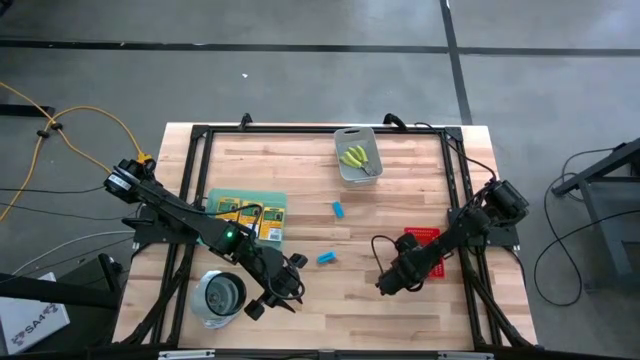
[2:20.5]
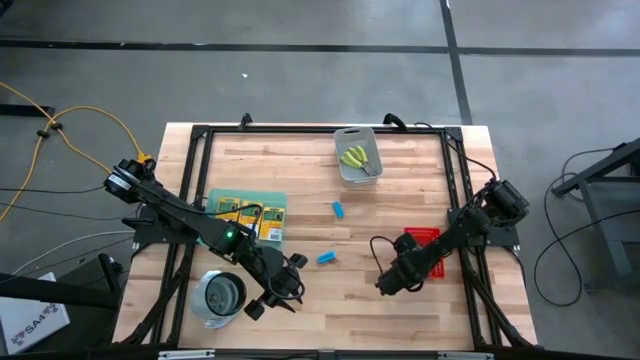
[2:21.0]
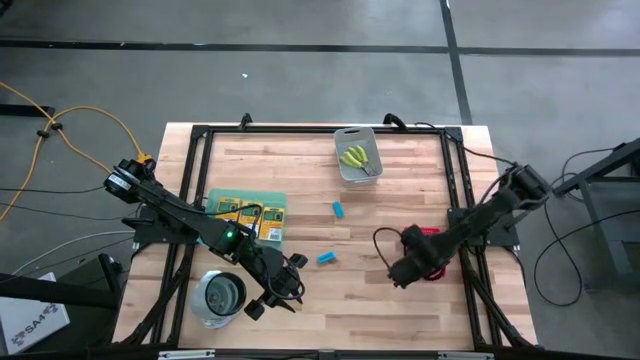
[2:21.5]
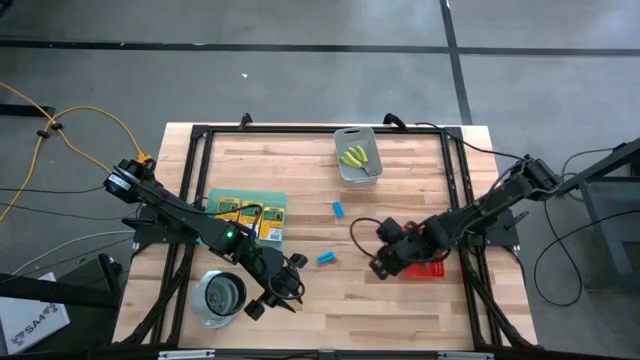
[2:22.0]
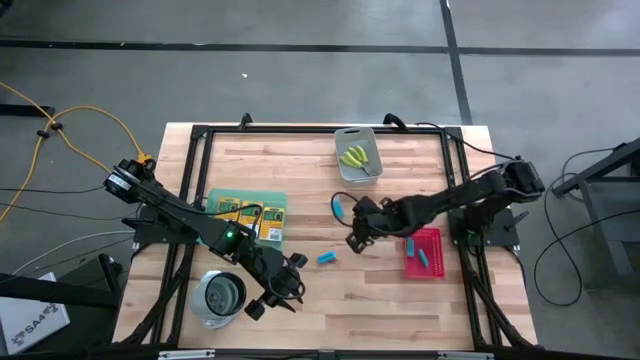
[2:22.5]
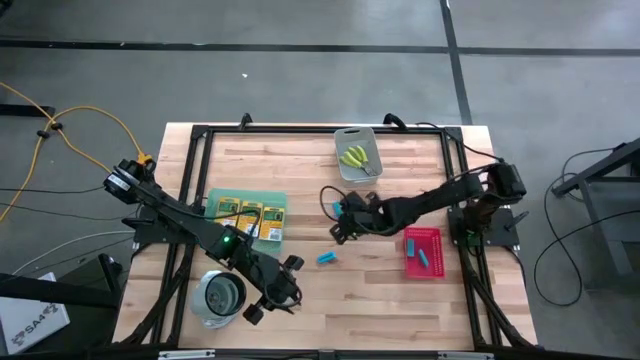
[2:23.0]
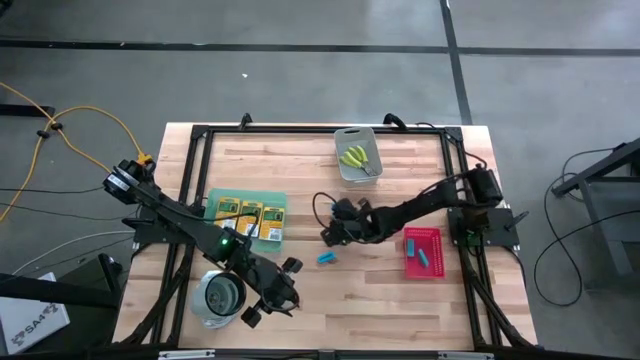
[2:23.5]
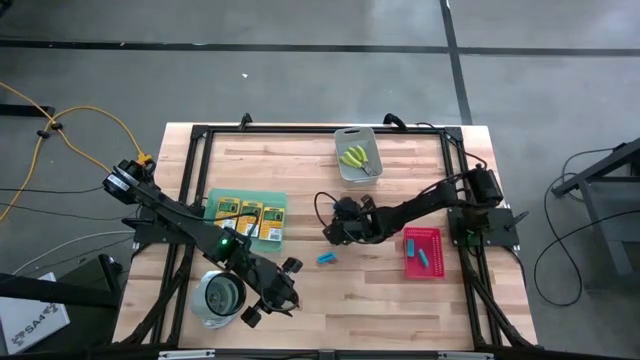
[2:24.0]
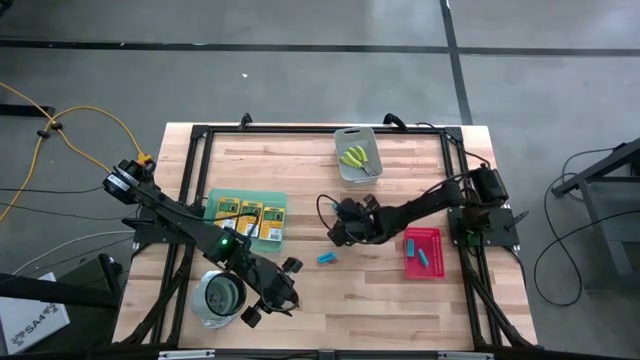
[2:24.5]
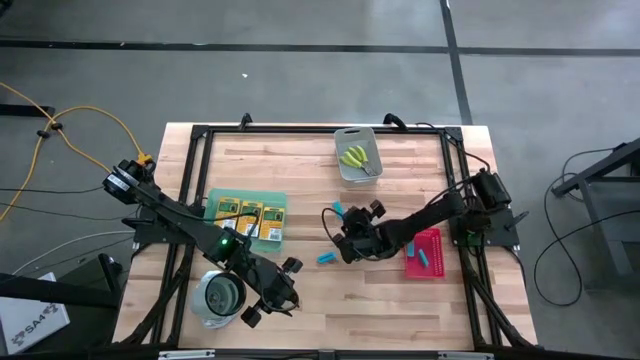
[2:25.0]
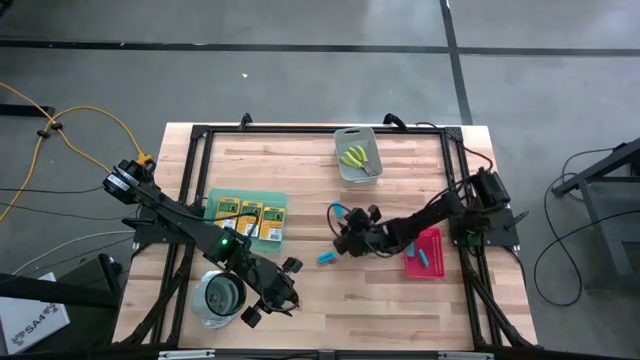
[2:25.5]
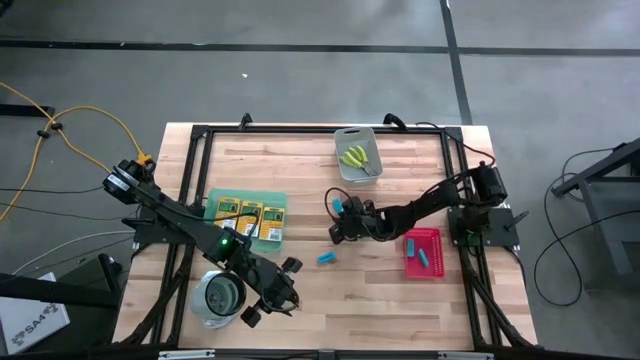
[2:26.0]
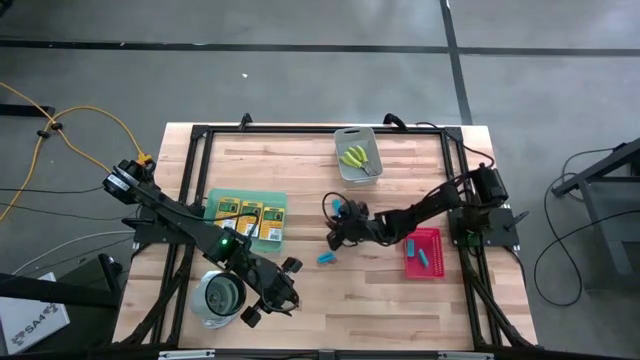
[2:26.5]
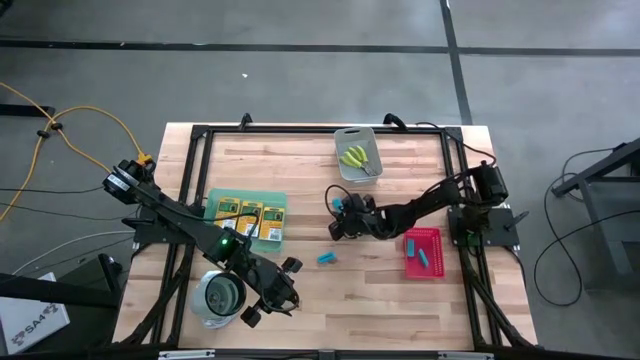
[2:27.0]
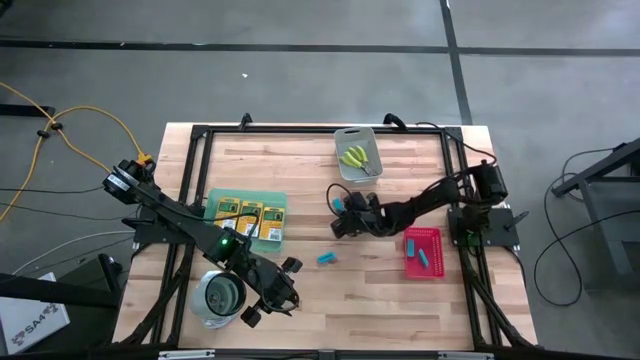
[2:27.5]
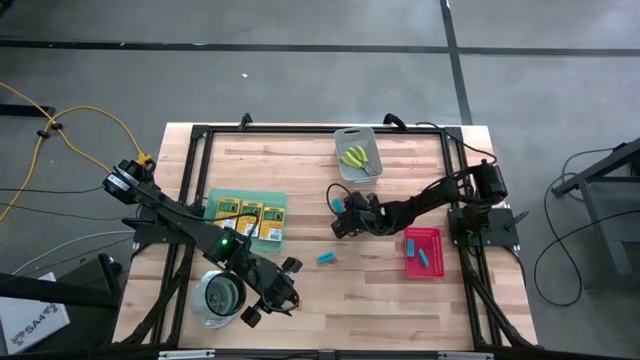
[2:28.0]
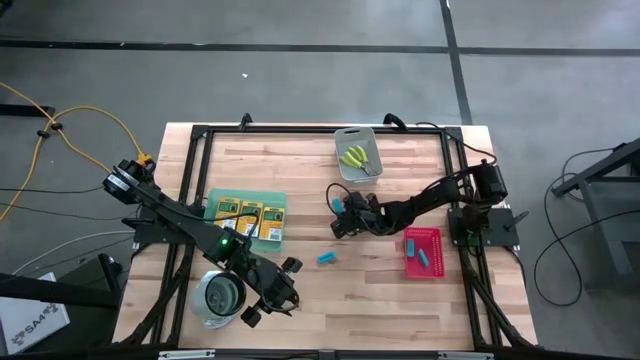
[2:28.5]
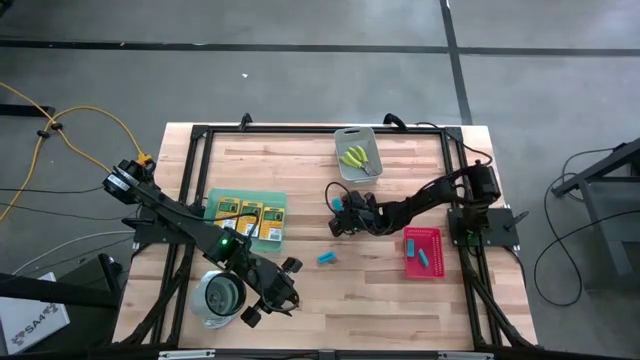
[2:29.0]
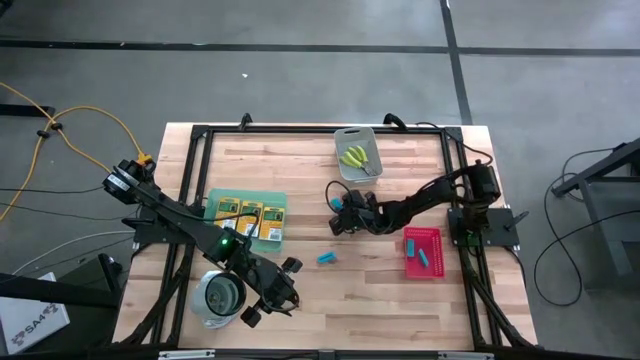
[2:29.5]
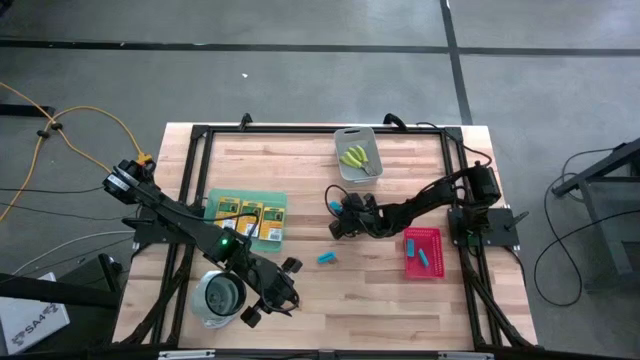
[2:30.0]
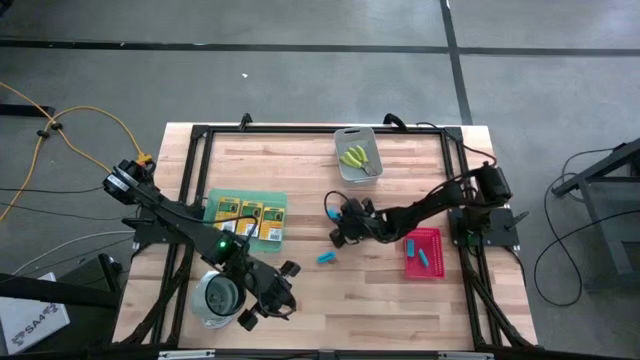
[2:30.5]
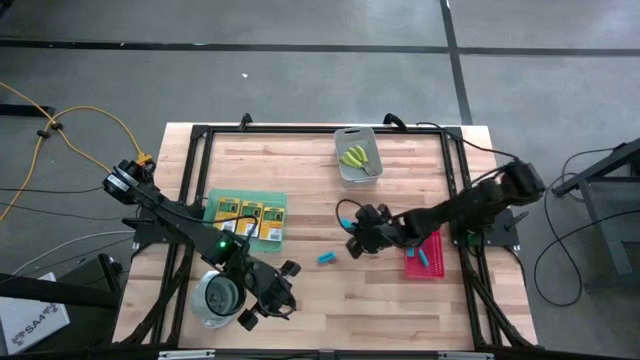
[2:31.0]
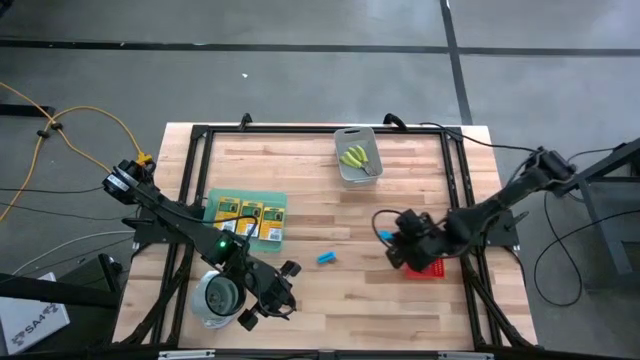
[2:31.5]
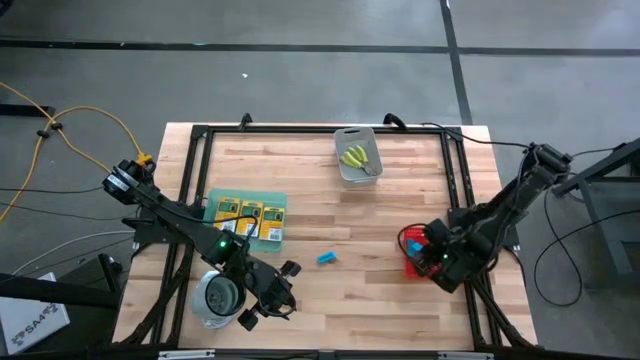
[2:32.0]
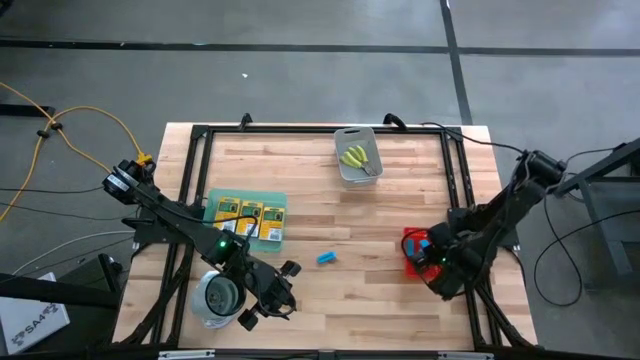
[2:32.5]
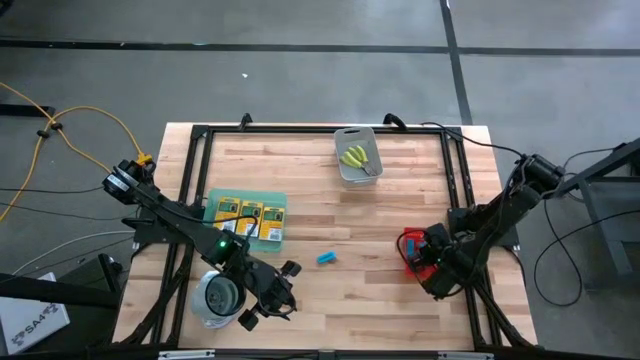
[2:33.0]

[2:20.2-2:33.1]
Task: Pick & Place School Supplies
Put the blue eraser into the red bin

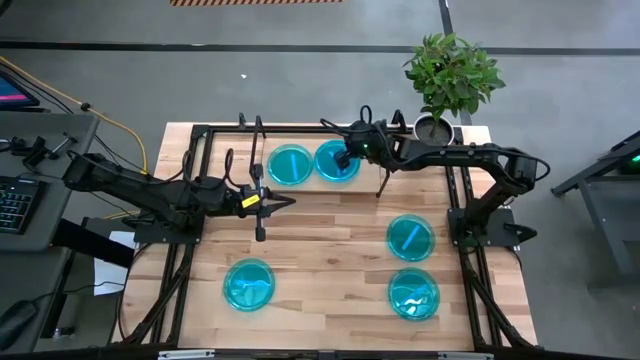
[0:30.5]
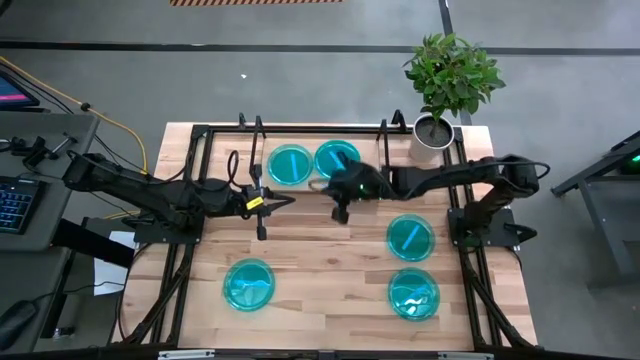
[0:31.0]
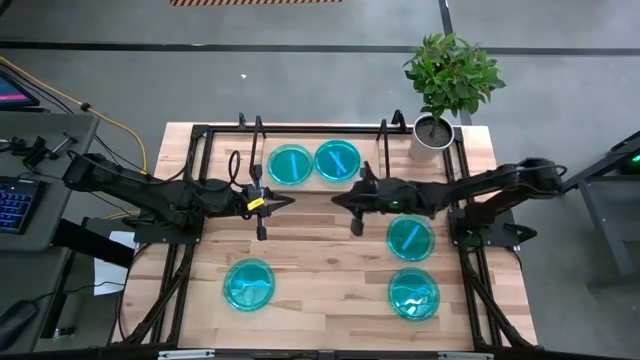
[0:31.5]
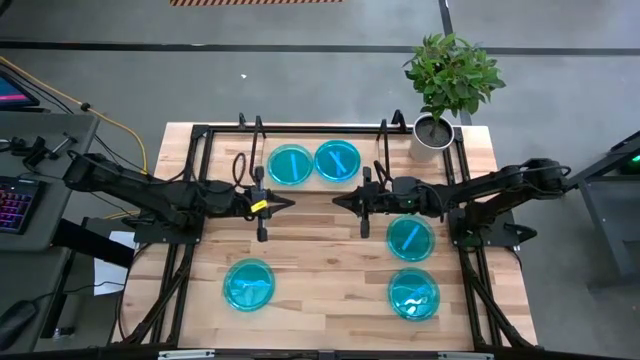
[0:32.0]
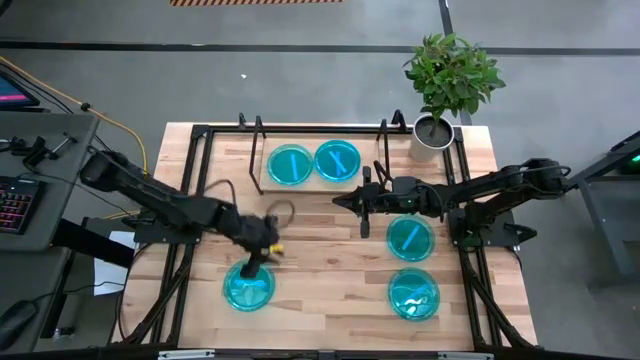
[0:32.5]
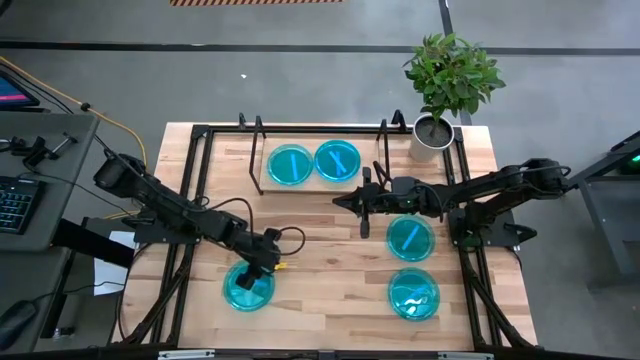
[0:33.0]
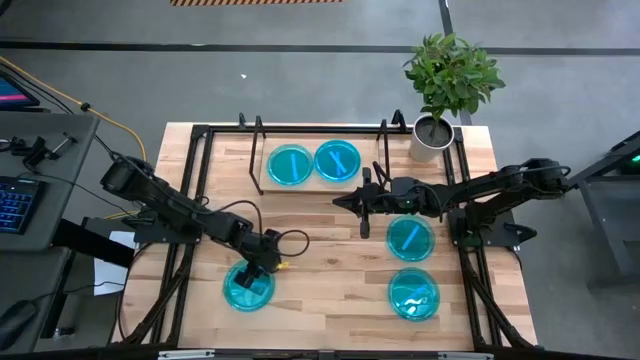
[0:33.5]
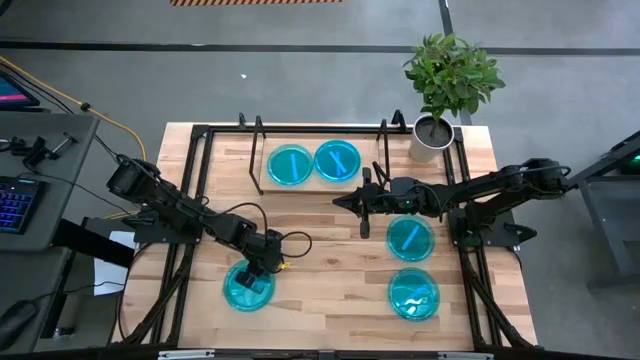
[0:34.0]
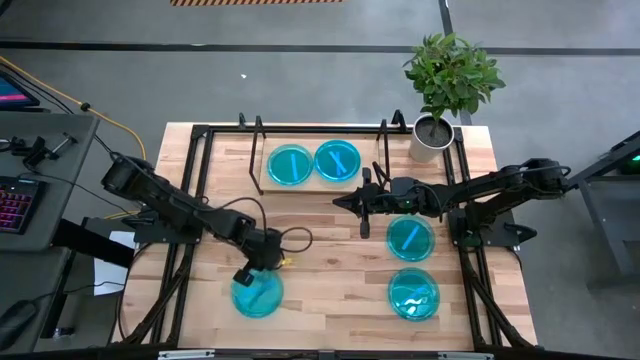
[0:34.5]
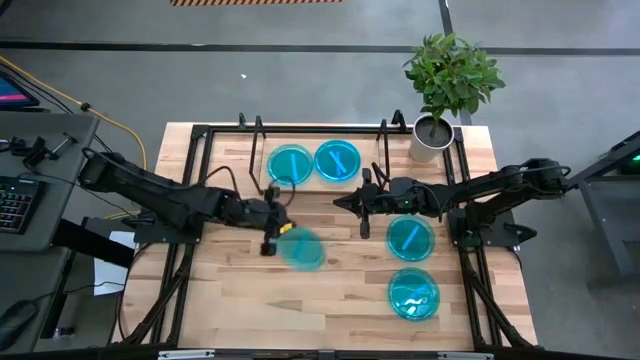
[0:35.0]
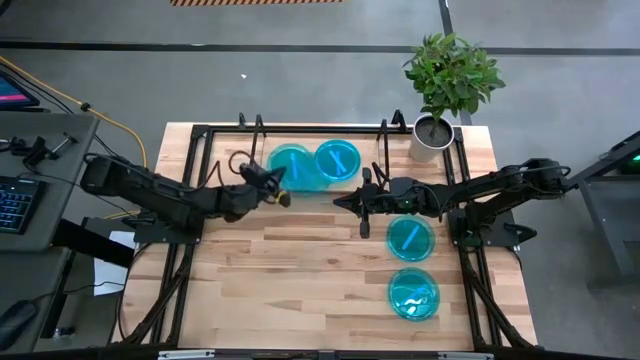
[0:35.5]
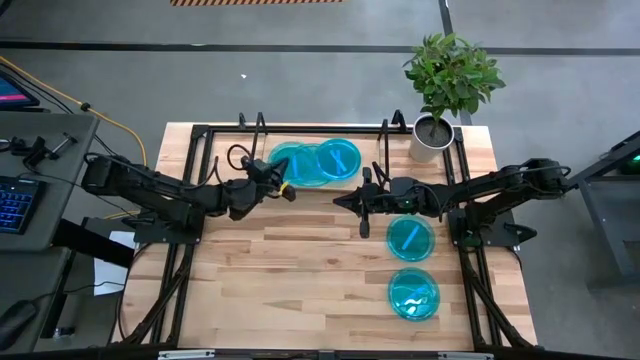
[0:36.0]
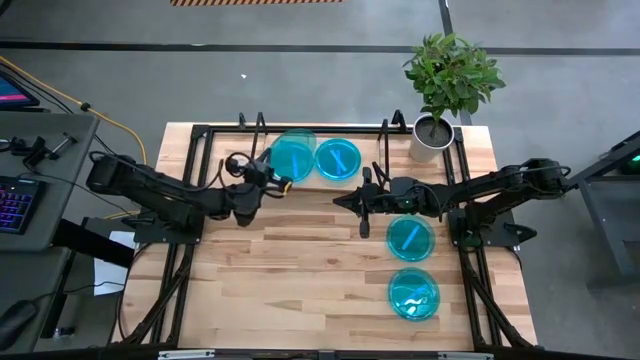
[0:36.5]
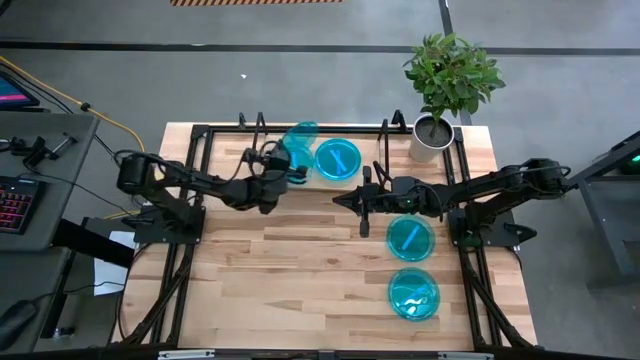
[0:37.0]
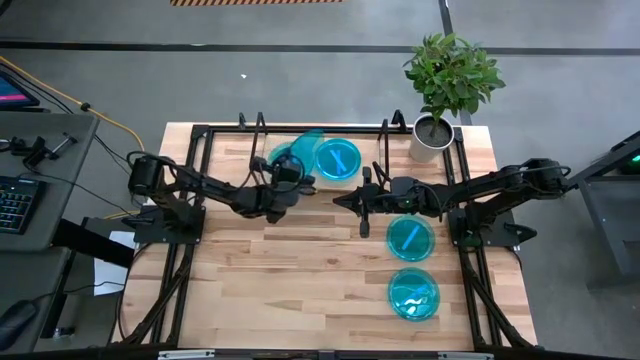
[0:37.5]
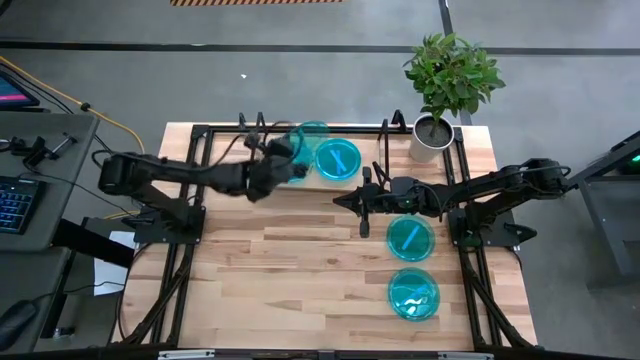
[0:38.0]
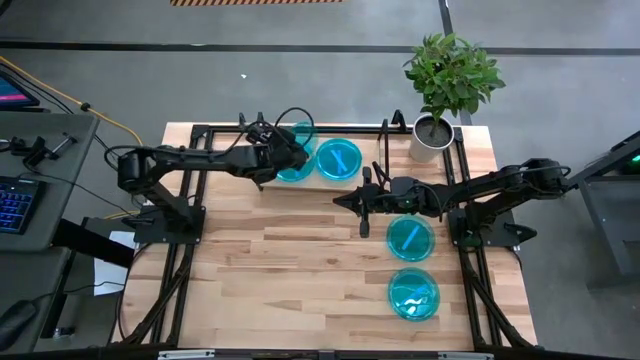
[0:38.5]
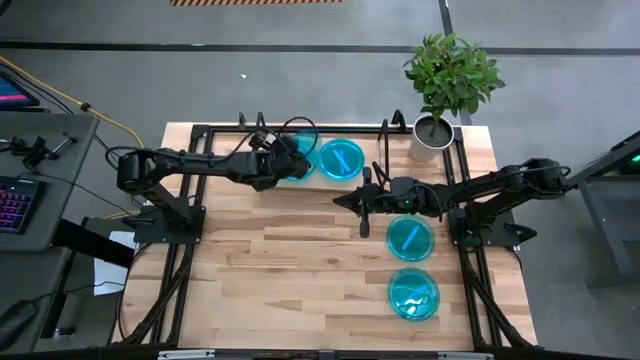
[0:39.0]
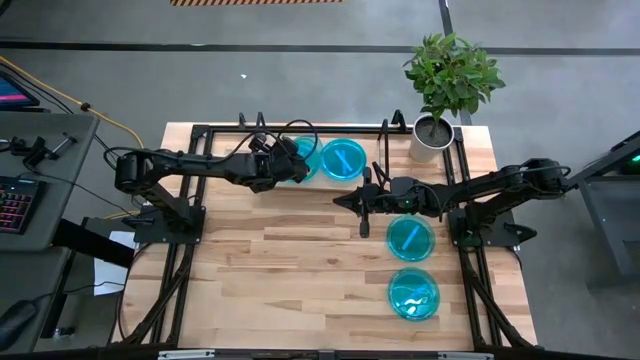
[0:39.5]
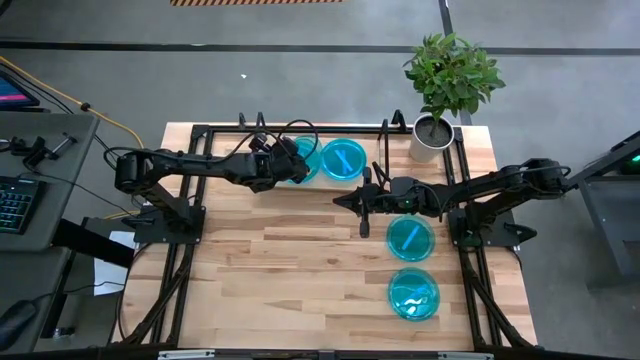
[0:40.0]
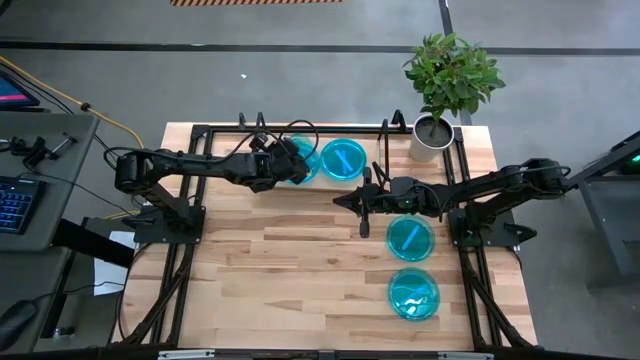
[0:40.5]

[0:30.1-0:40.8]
Task: Place and stack plates onto a shelf
Stack the blue plate on top of the blue plate on the shelf
